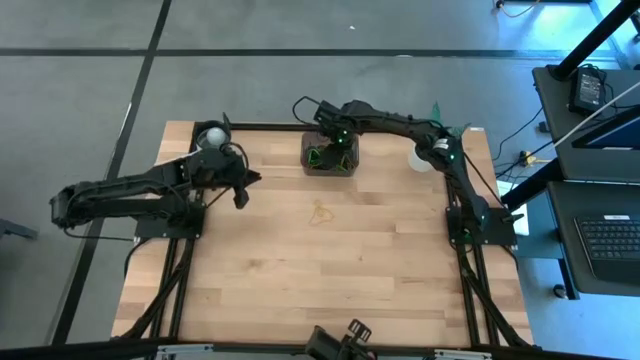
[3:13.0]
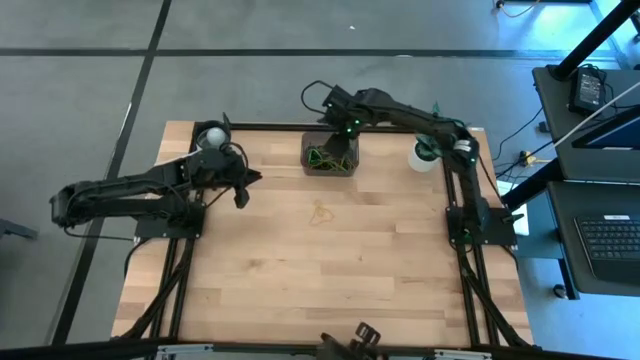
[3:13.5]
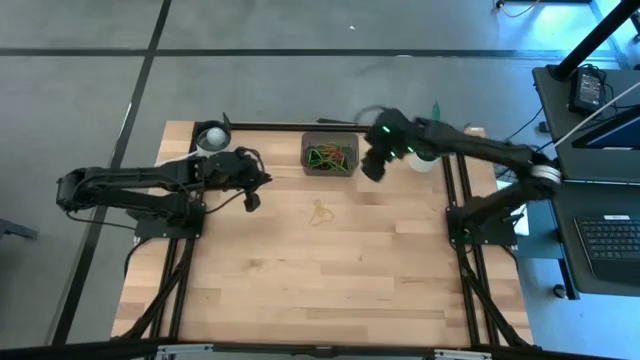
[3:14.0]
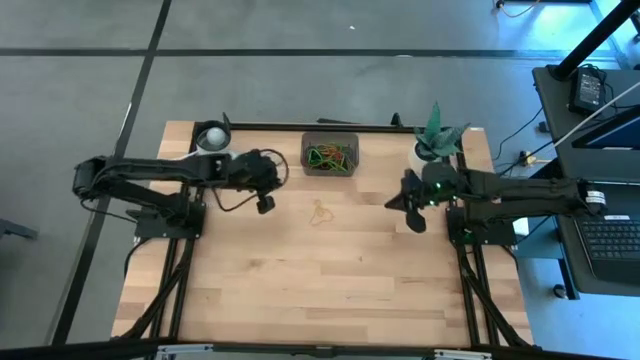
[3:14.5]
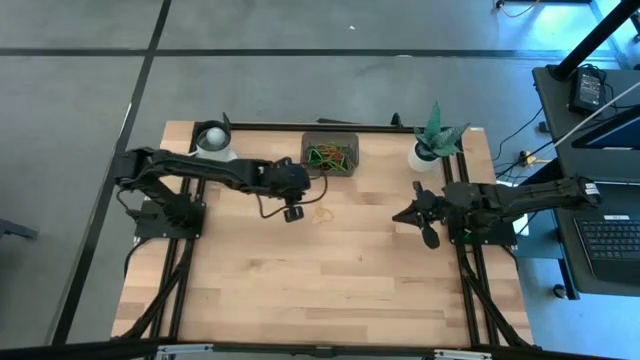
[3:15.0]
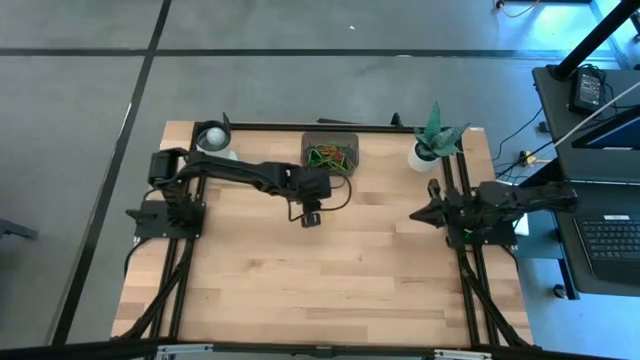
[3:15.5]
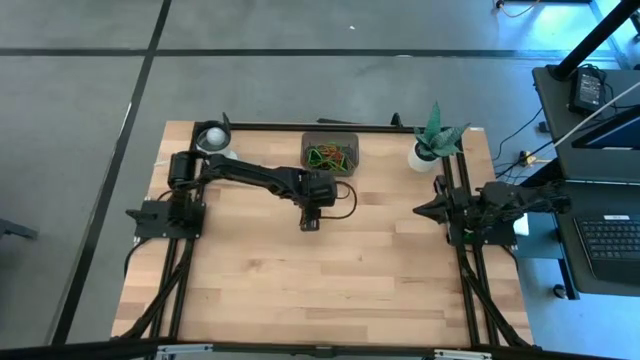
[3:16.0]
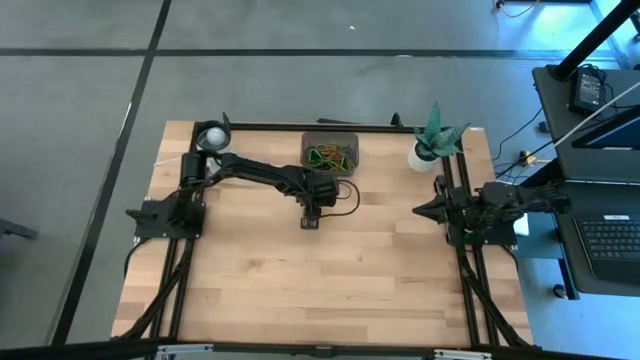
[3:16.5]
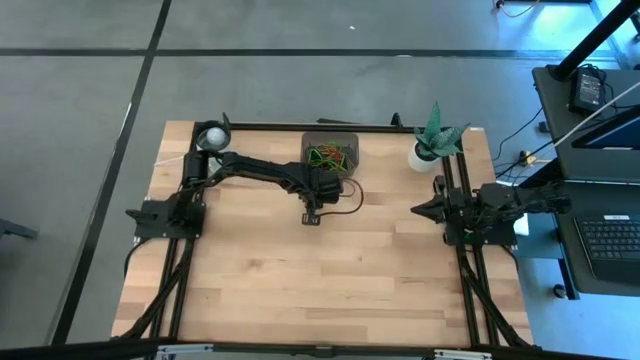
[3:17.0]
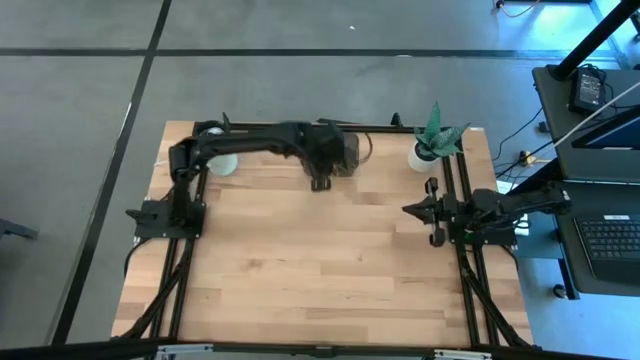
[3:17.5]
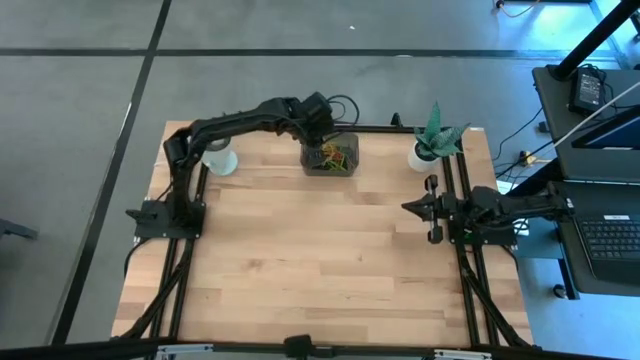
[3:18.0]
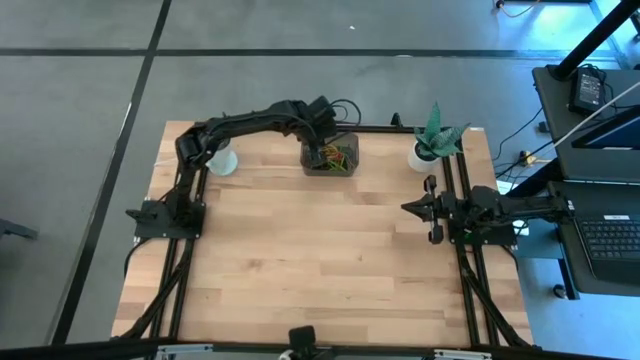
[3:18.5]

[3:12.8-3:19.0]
Task: Pick and place rubber bands into bin
Put the yellow rubber band into the bin

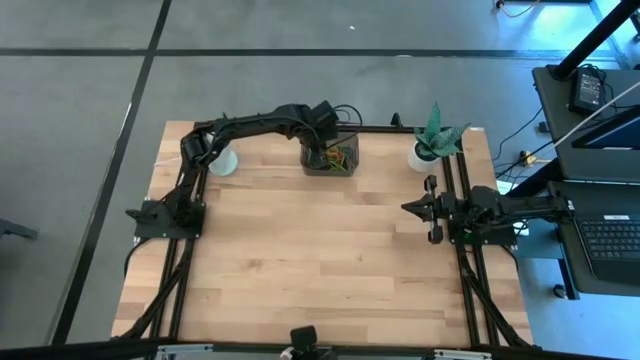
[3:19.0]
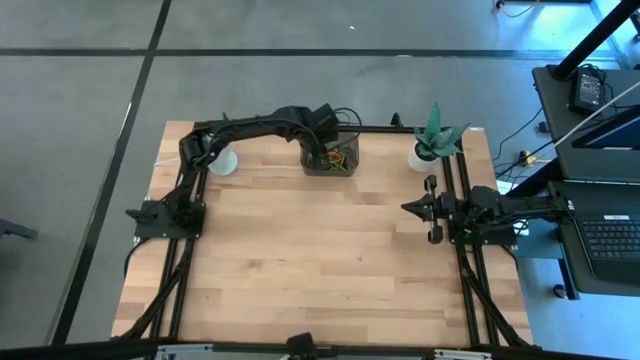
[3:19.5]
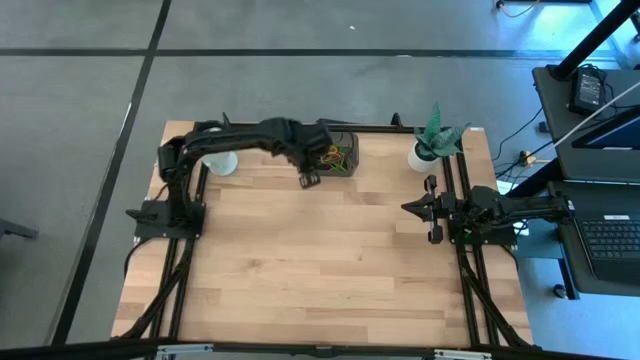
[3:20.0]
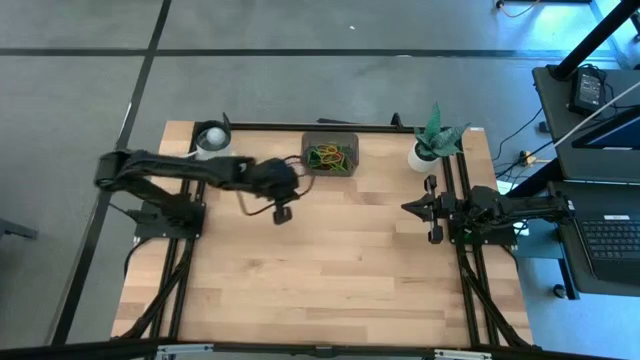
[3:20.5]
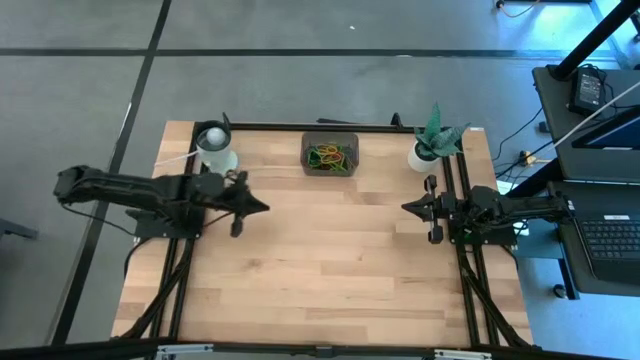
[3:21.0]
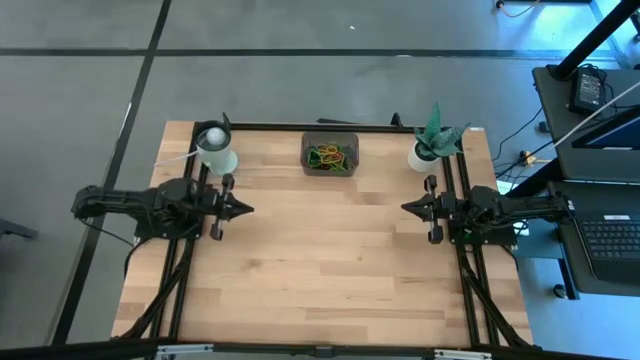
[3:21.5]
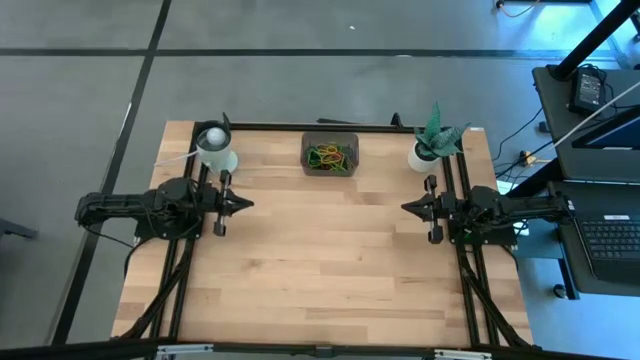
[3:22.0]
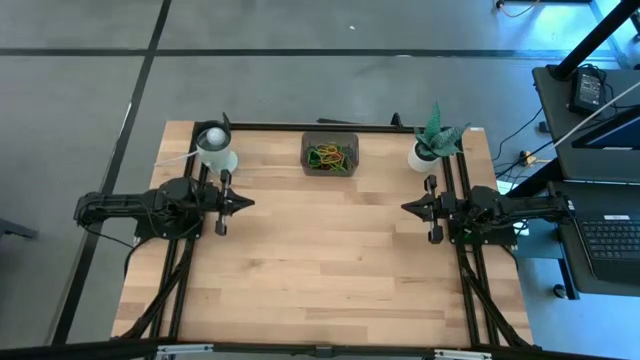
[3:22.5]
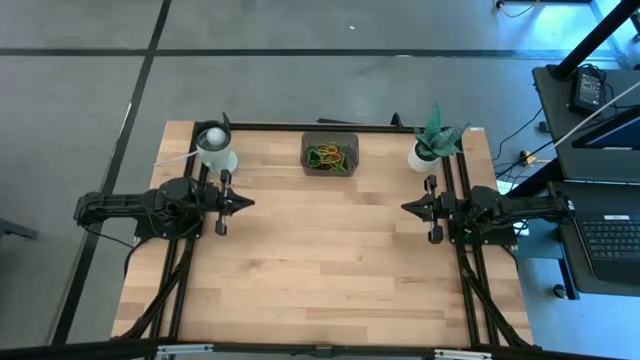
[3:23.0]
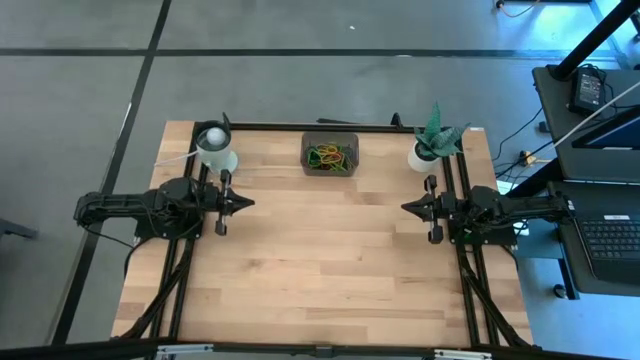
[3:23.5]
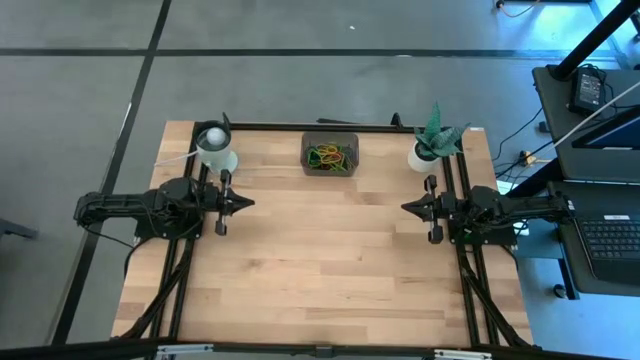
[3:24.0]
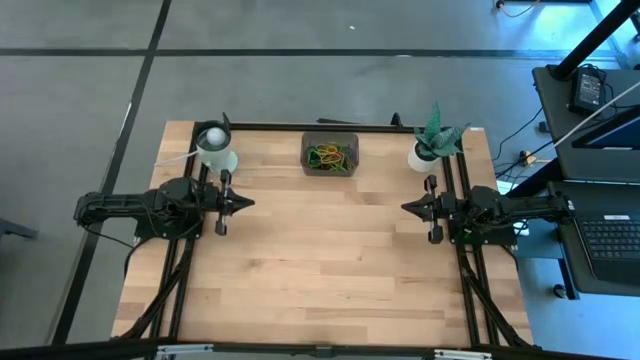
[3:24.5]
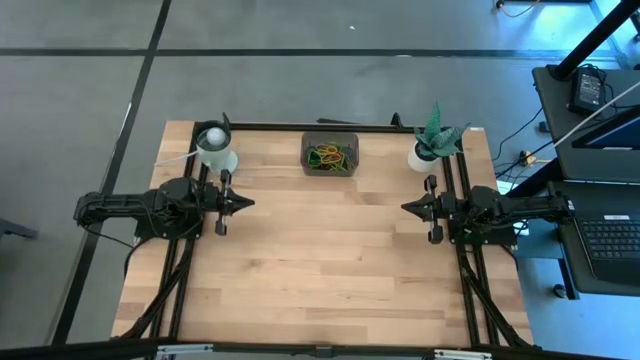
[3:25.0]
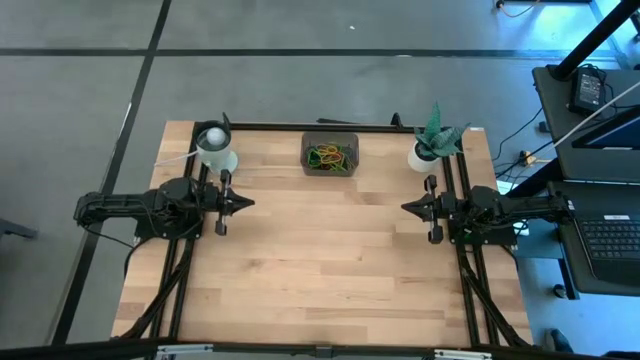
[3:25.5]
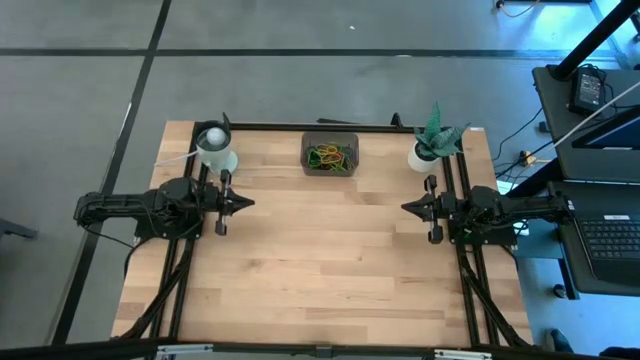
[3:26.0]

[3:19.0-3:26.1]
Return to Home Position

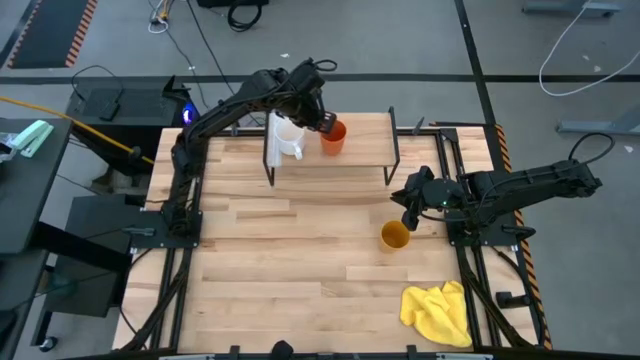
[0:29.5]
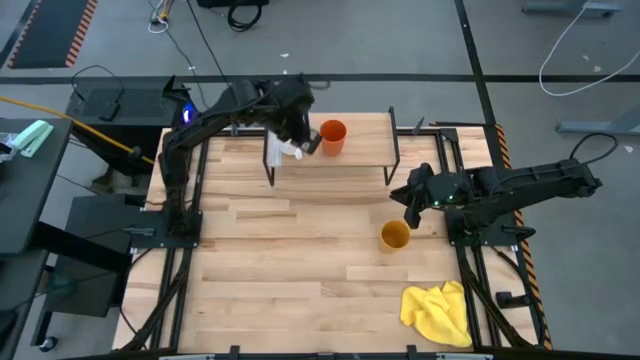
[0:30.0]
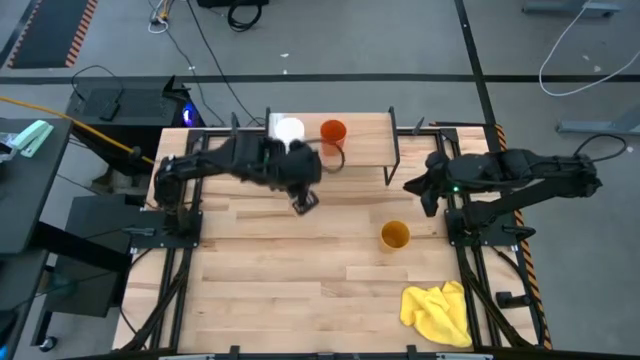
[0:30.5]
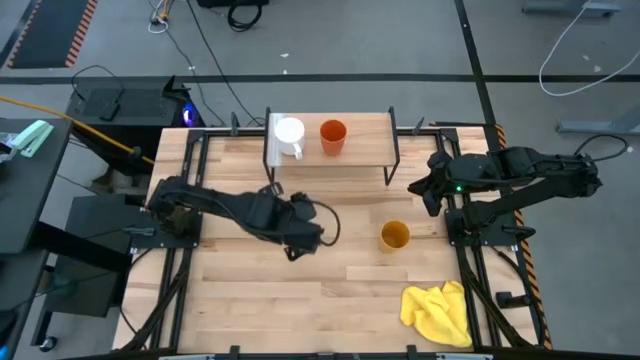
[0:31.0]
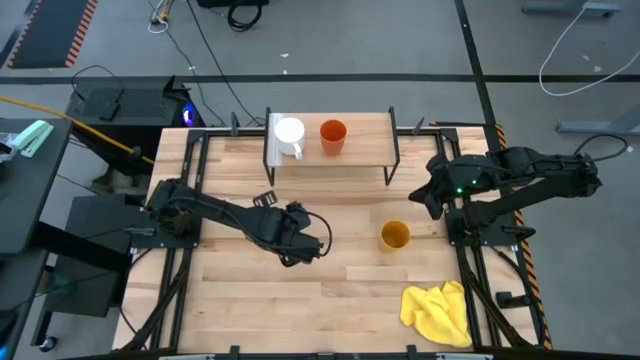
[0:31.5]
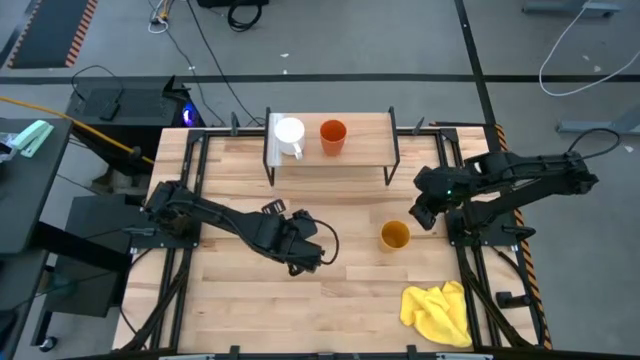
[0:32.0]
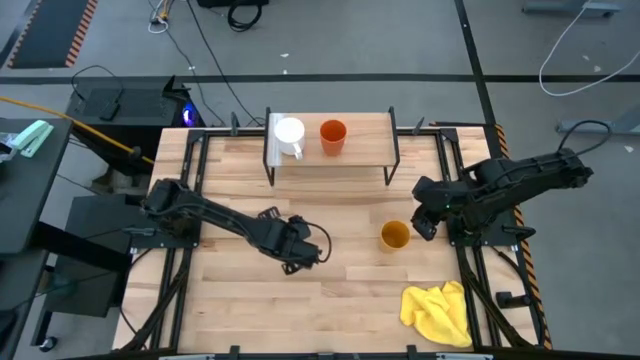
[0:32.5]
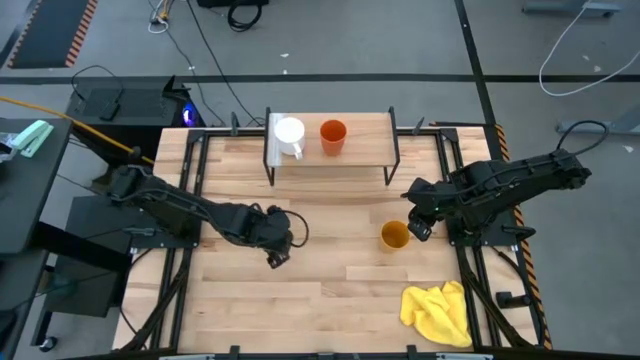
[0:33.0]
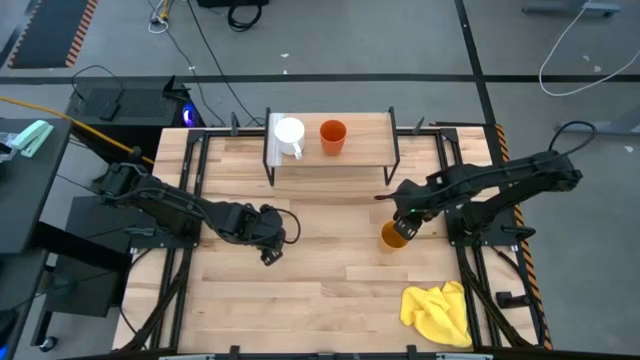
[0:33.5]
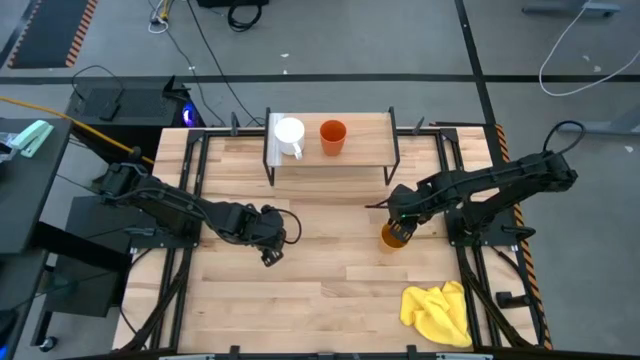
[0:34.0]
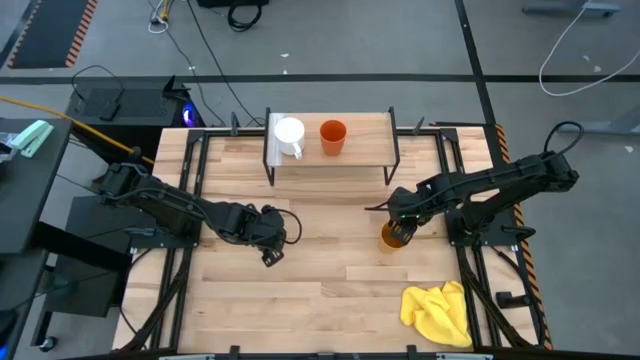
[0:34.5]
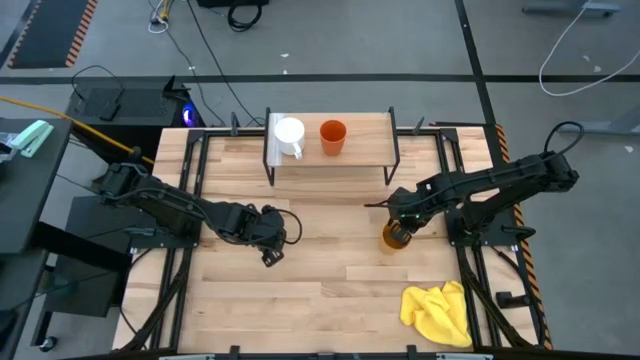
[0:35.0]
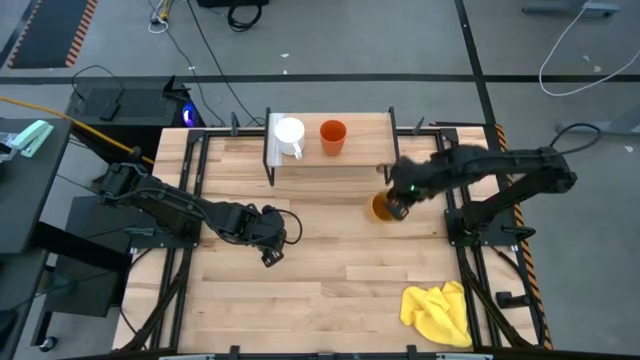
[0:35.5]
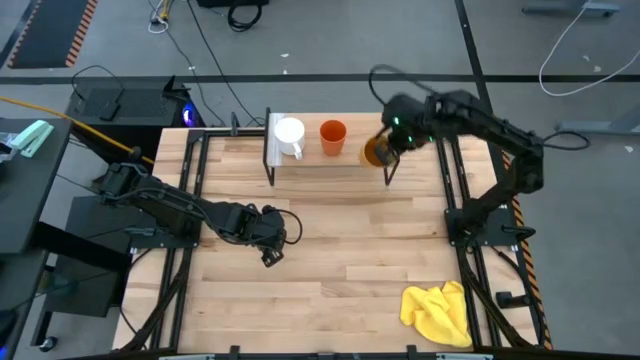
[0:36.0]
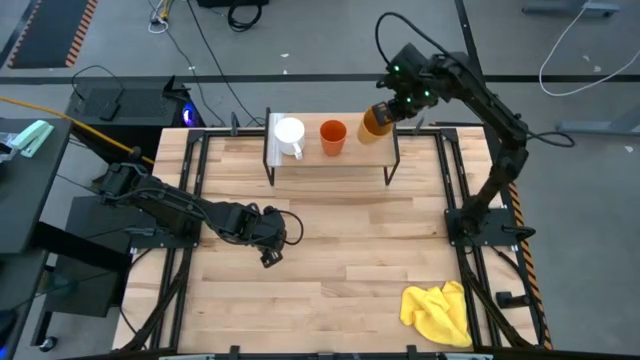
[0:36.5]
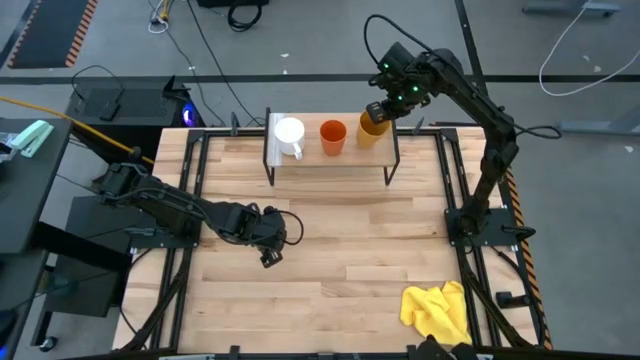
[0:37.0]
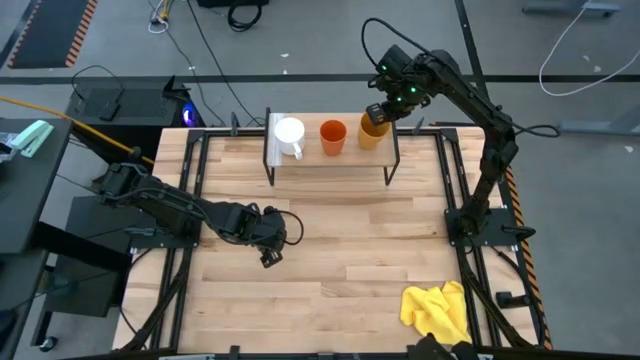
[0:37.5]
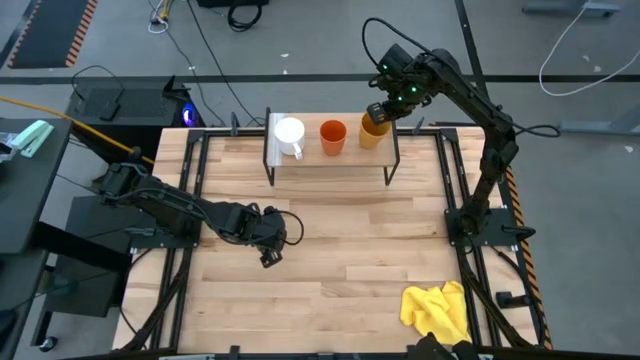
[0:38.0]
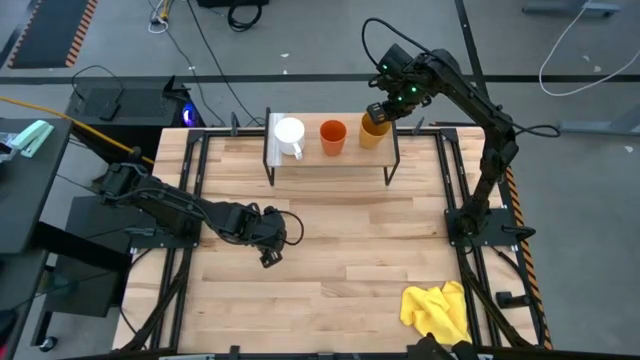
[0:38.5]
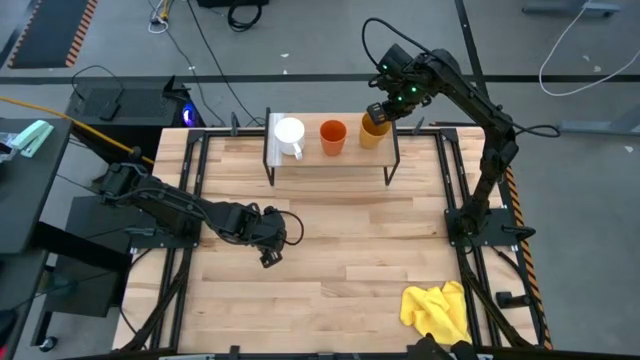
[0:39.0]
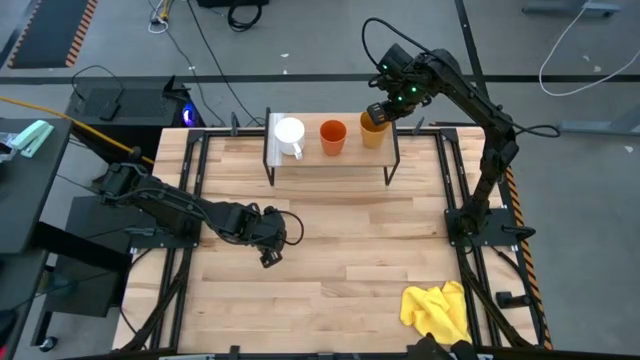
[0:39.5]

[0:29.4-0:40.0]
Task: Stack small to large cups/mugs on shelf
Put the yellow cup on the shelf
